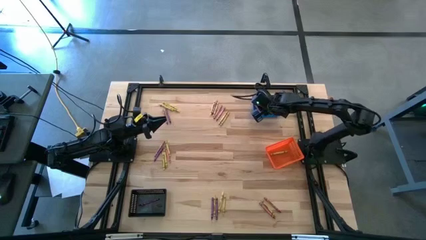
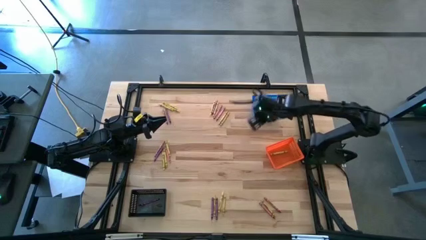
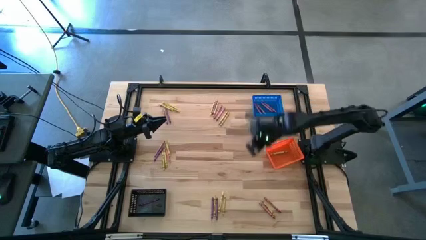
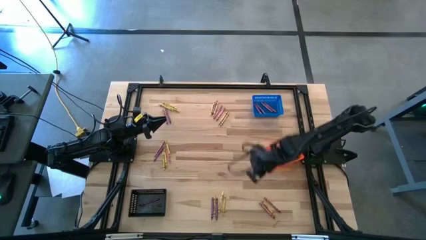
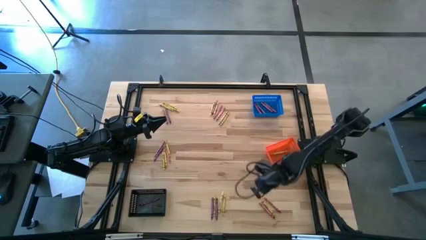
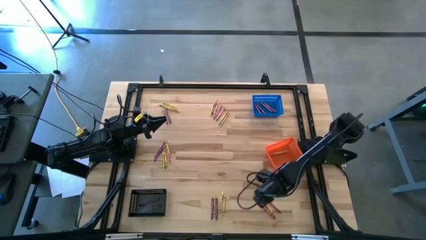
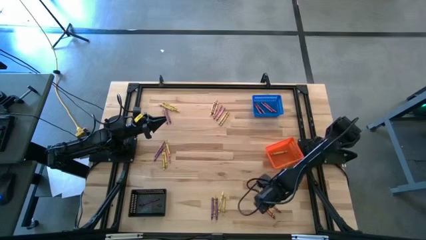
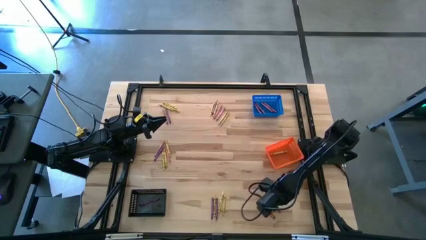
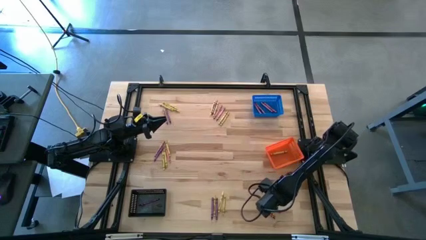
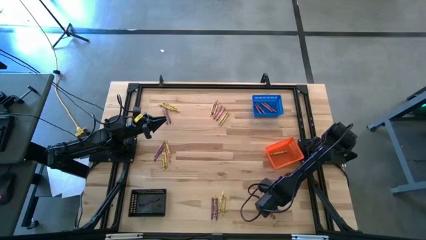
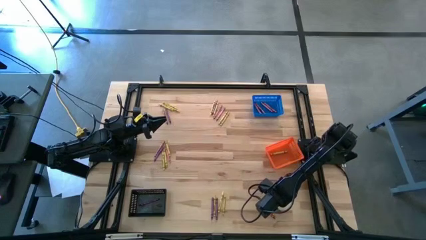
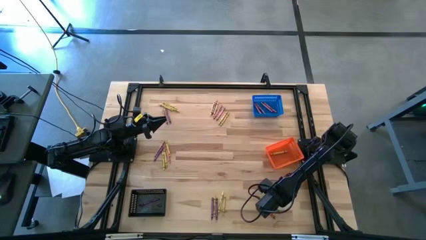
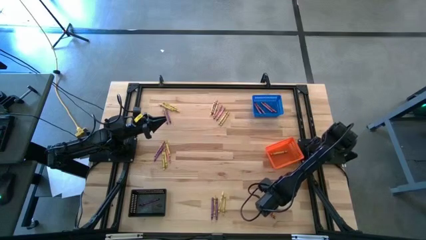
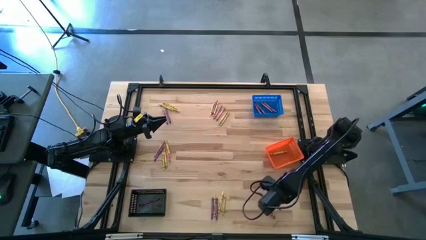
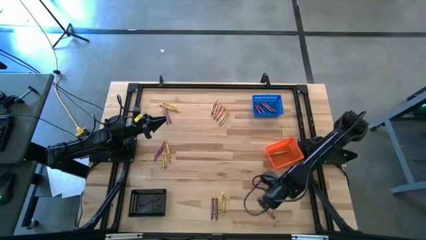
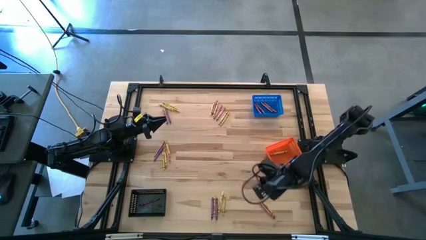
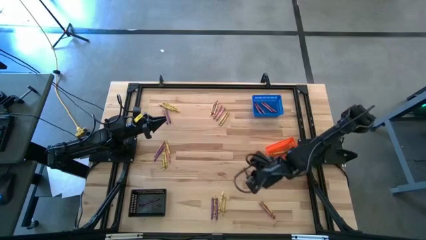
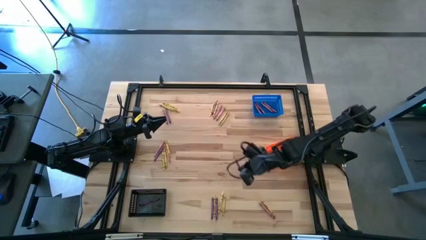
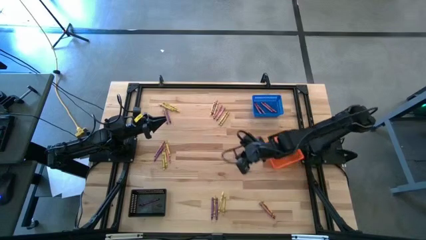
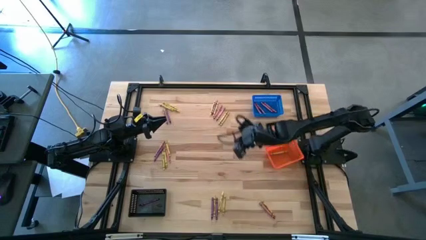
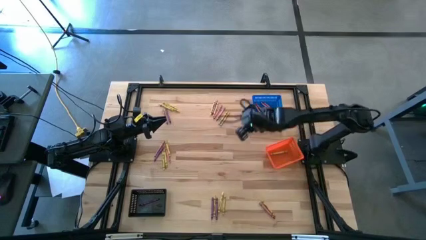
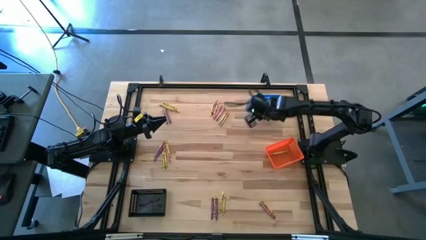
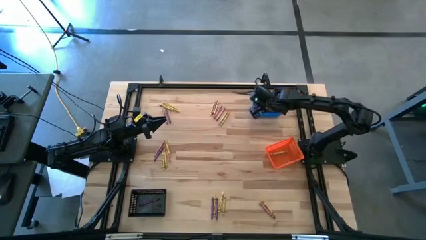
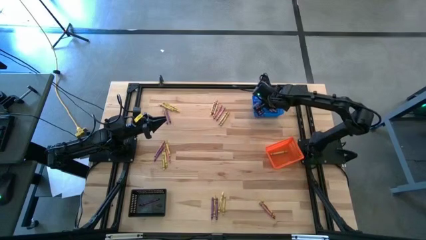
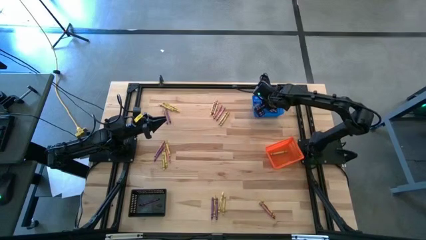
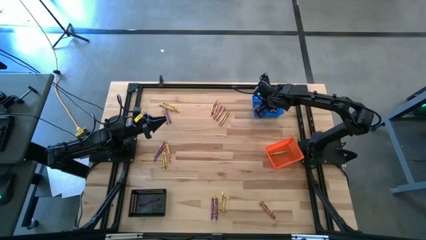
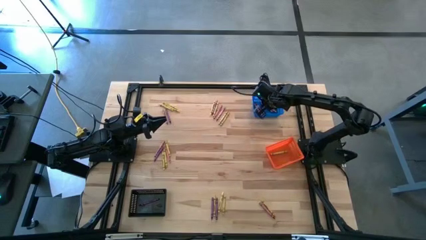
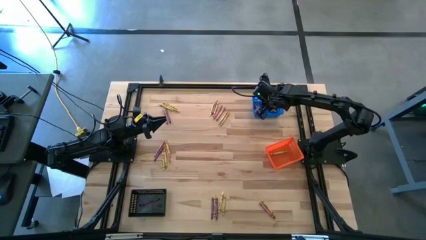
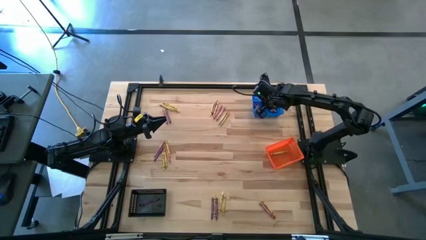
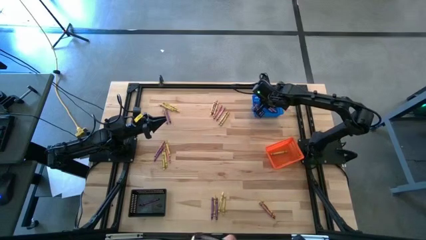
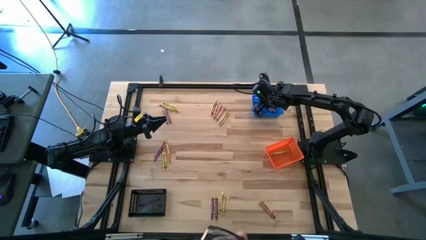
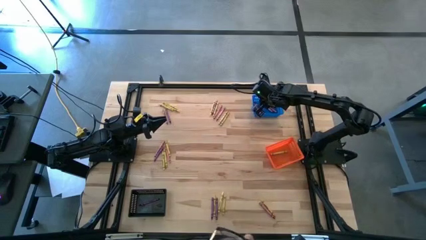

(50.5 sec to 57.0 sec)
Task: Sort crayons
Put the red crayon into the blue basket

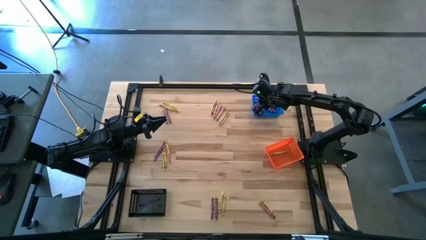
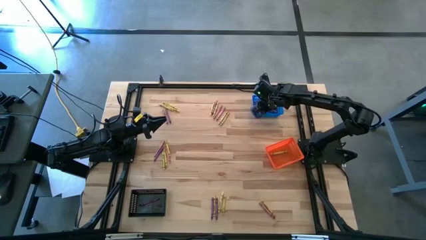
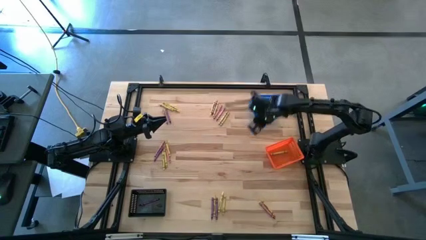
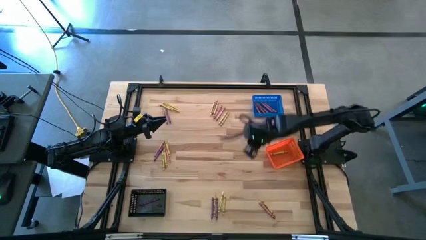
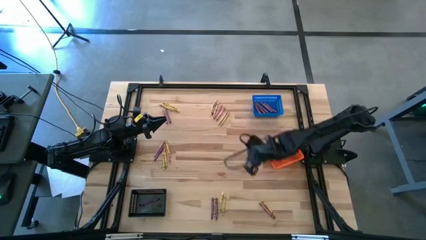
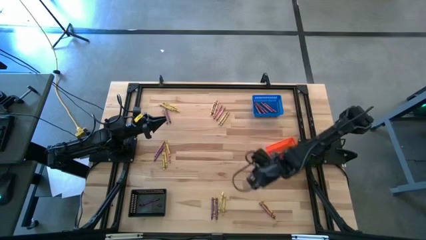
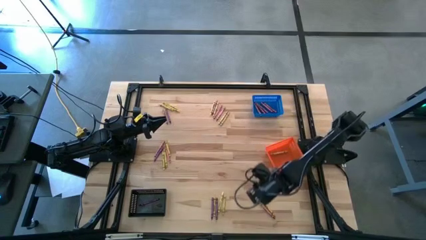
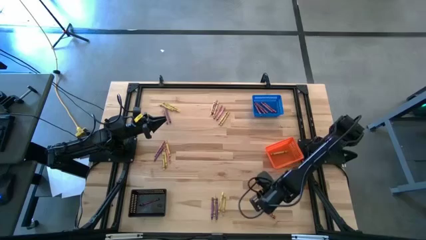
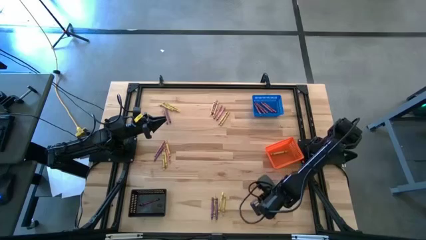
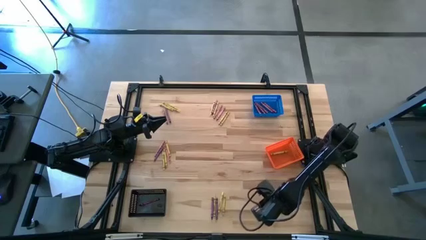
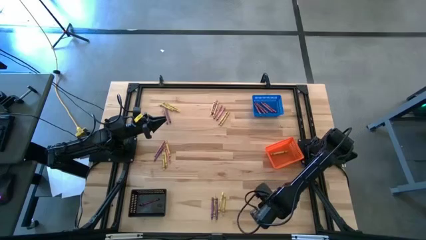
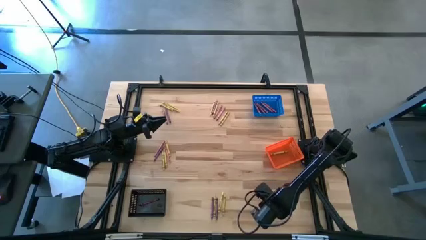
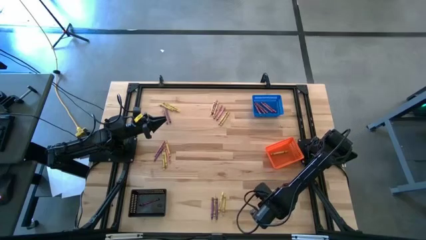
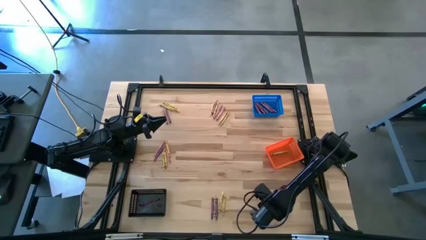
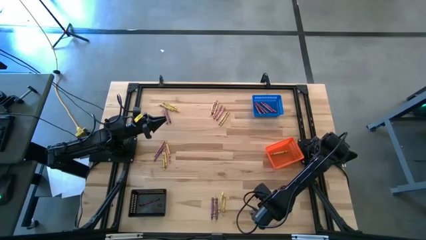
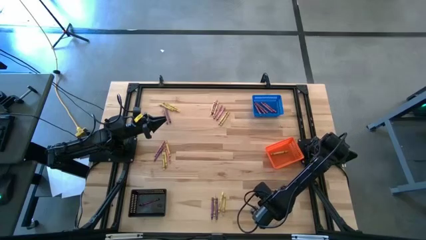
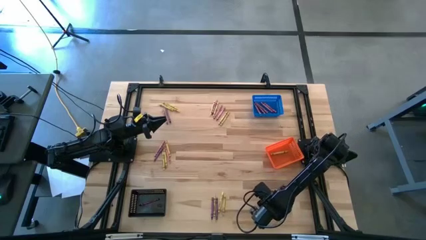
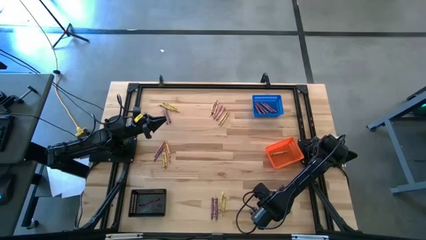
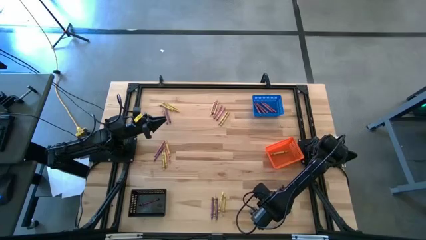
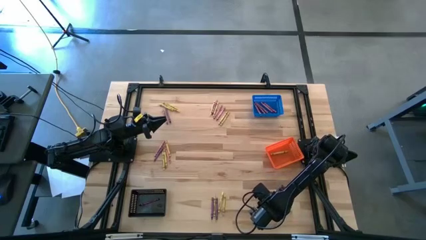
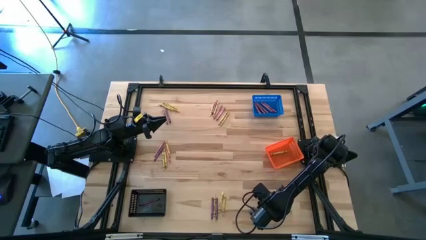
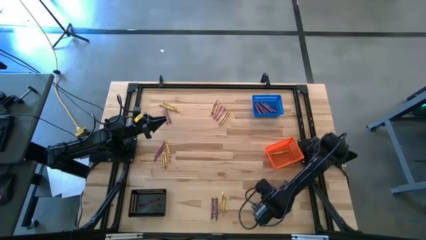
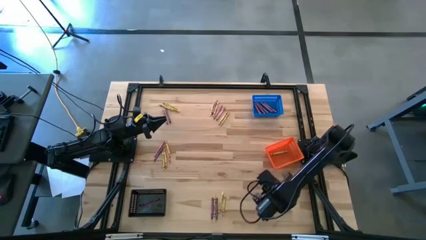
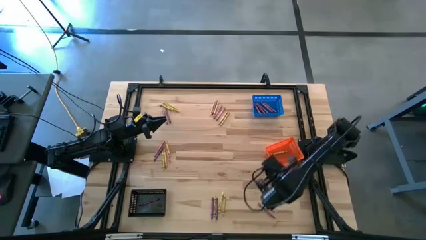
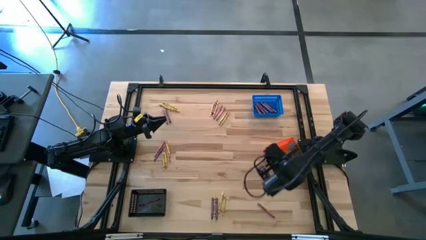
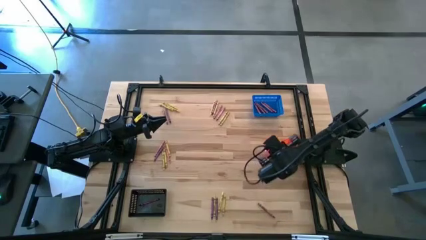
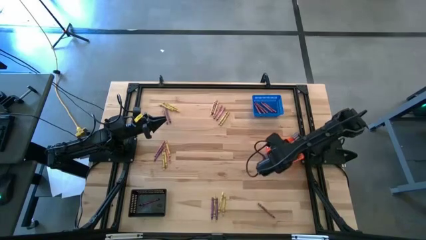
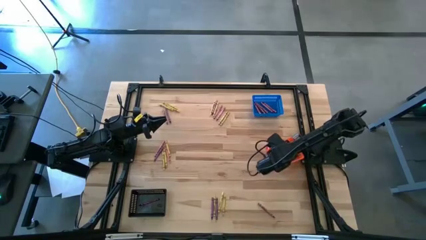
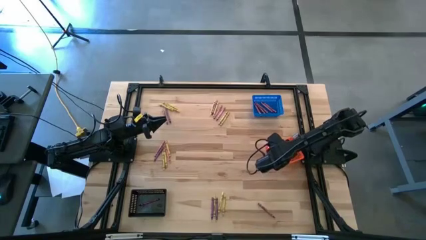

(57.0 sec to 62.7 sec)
Put the yellow crayon into the orange basket

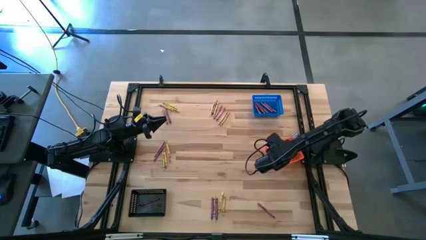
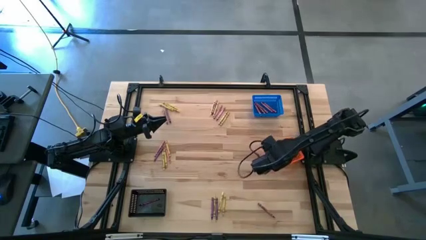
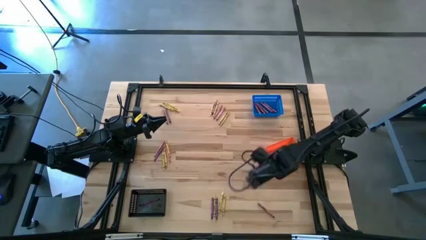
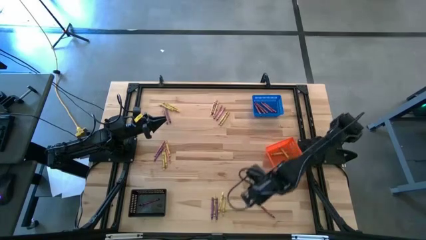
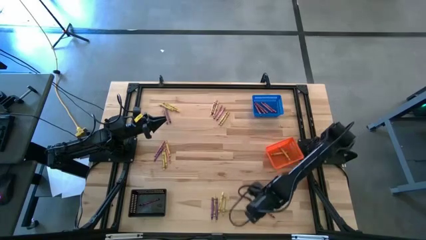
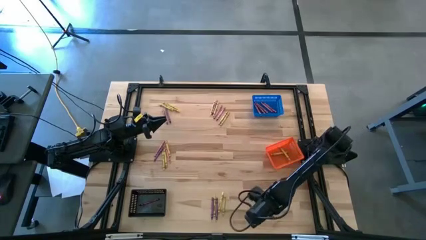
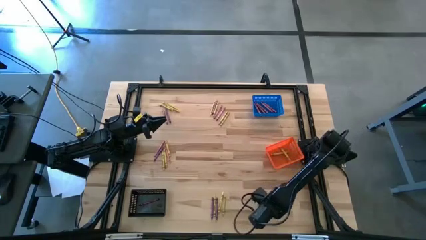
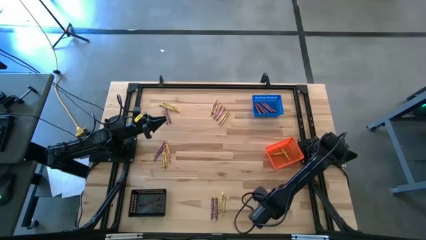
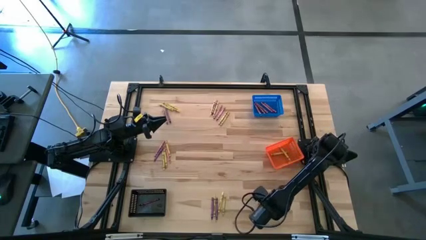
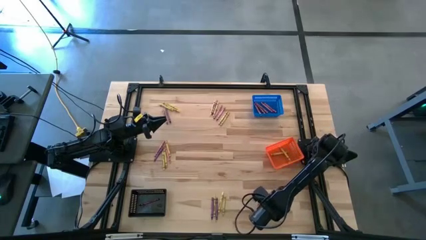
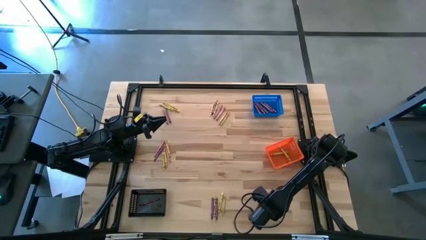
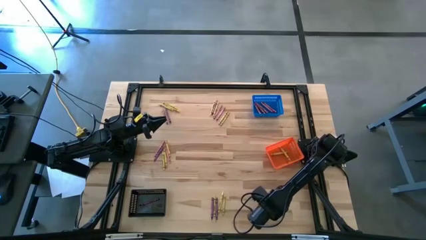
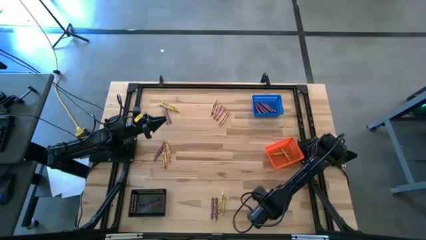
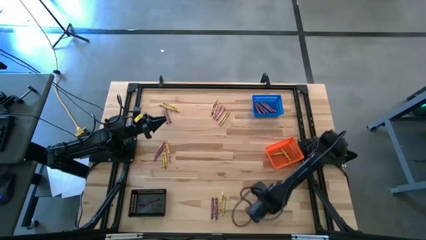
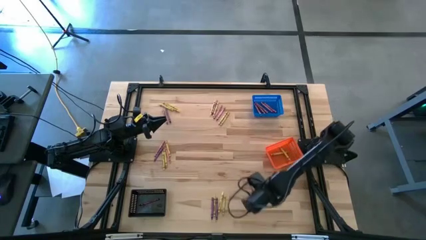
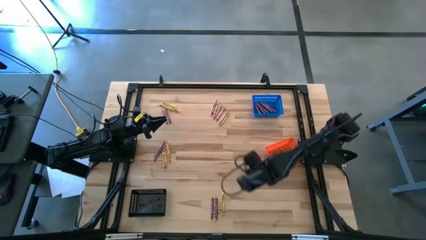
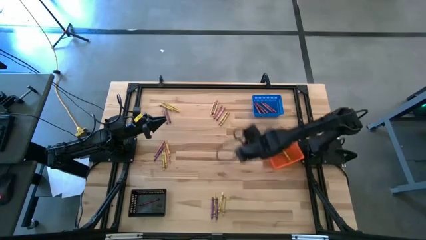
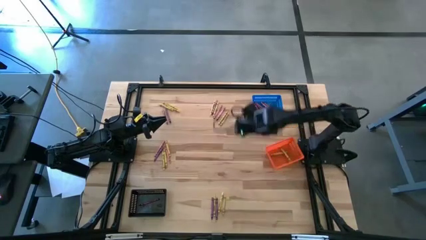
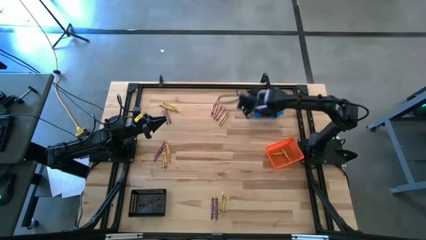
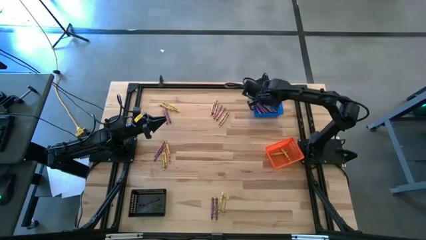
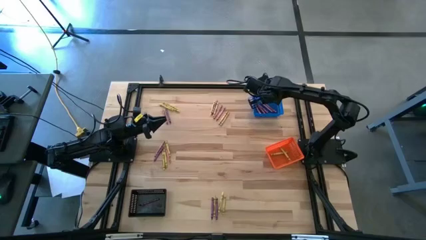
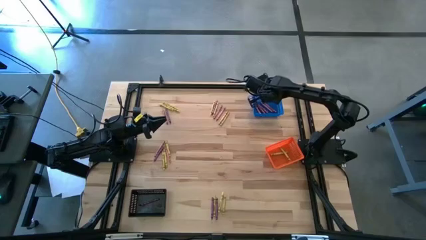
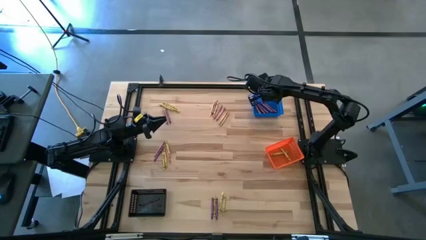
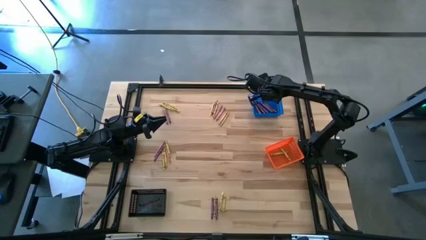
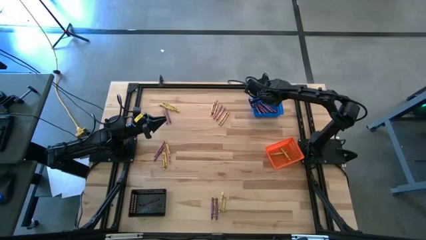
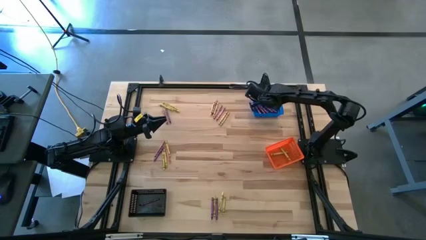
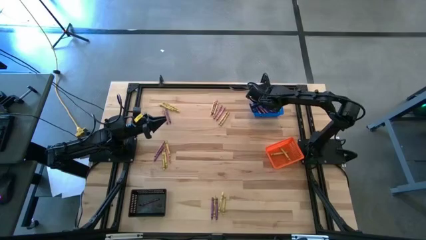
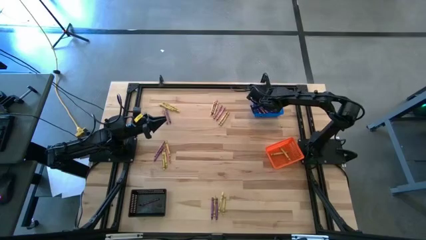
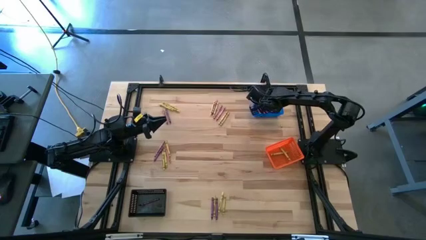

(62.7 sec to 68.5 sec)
Put the red crayon into the blue basket
